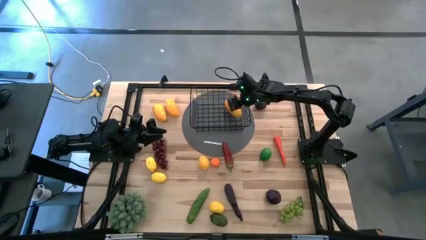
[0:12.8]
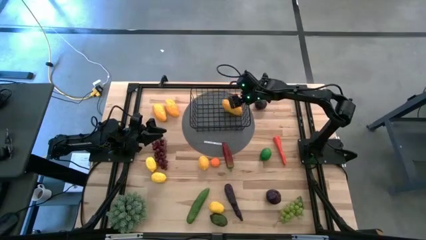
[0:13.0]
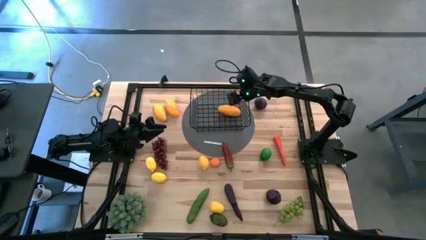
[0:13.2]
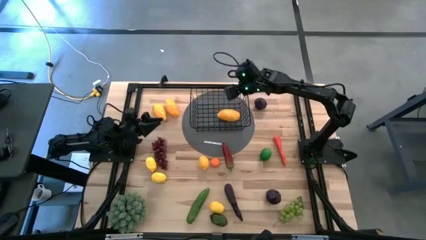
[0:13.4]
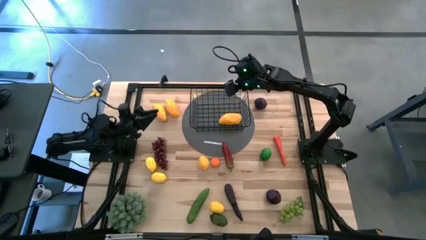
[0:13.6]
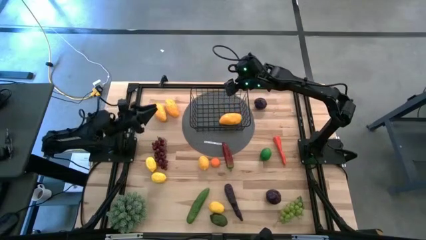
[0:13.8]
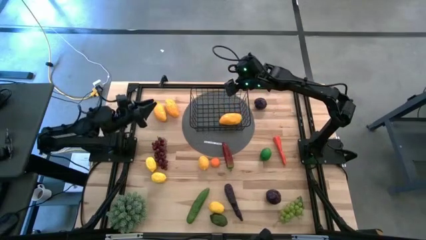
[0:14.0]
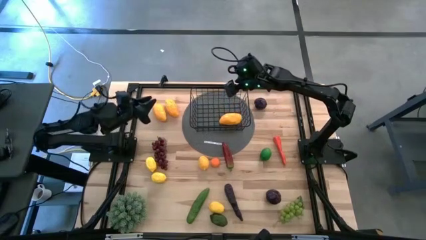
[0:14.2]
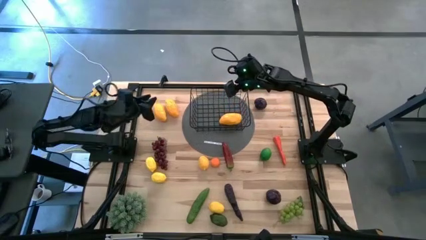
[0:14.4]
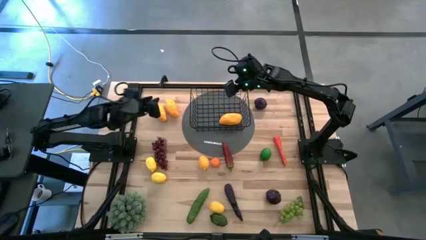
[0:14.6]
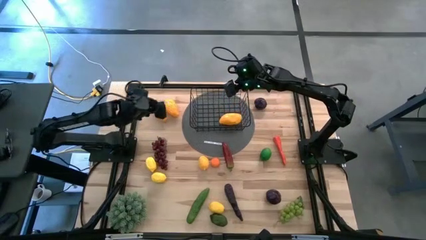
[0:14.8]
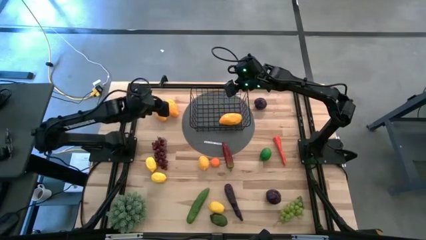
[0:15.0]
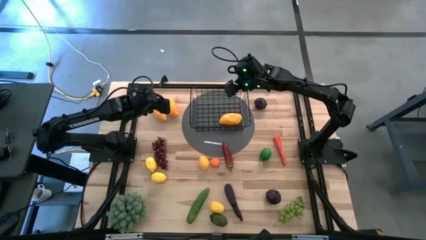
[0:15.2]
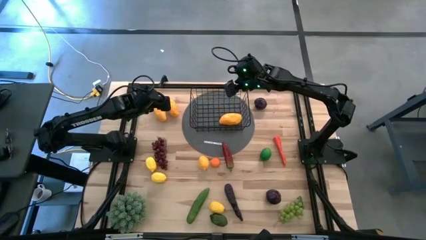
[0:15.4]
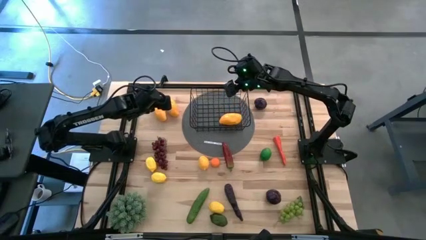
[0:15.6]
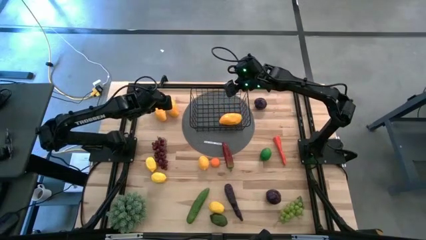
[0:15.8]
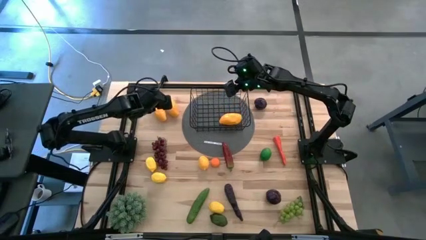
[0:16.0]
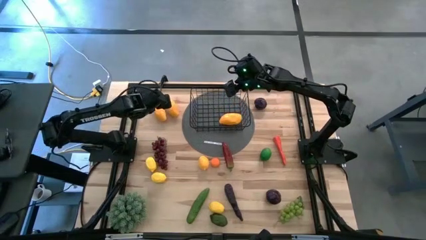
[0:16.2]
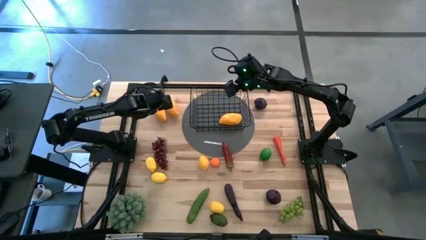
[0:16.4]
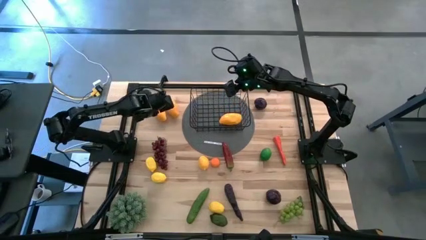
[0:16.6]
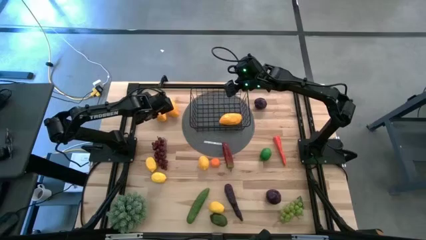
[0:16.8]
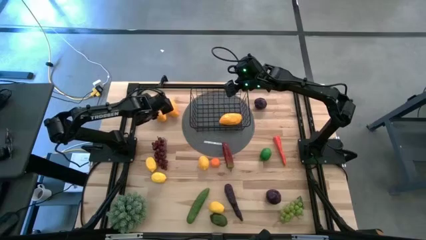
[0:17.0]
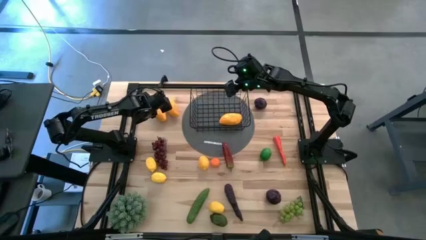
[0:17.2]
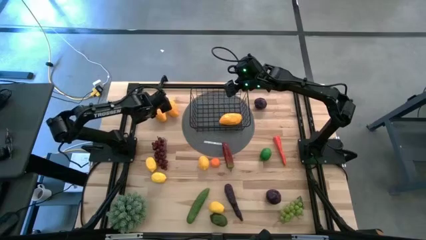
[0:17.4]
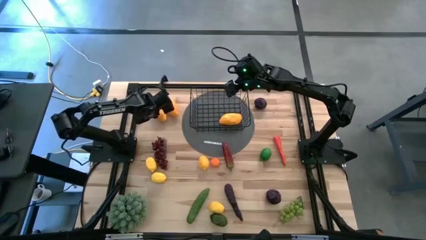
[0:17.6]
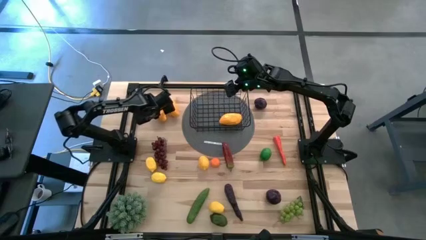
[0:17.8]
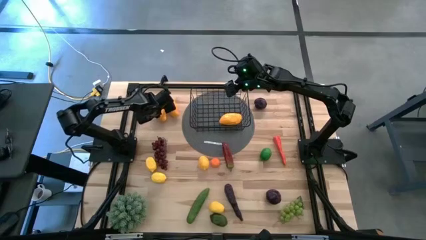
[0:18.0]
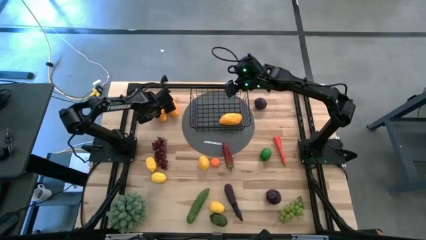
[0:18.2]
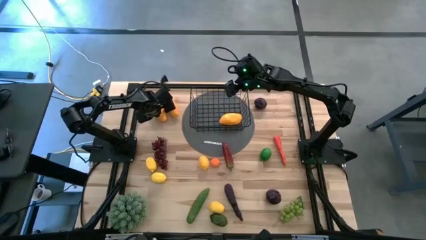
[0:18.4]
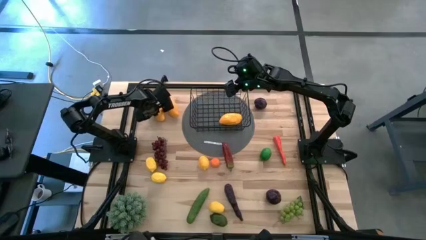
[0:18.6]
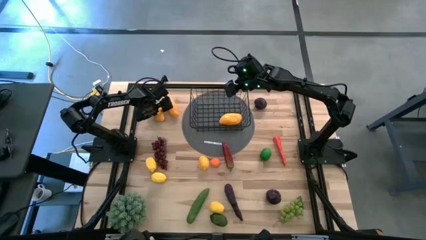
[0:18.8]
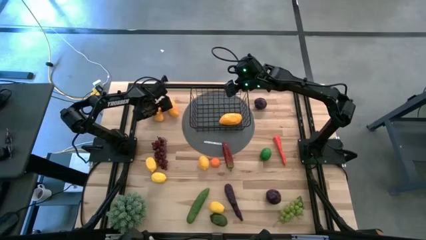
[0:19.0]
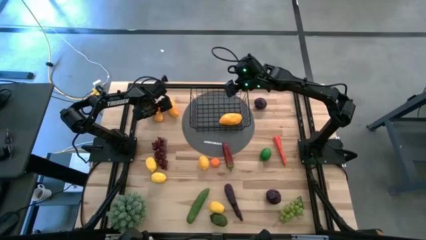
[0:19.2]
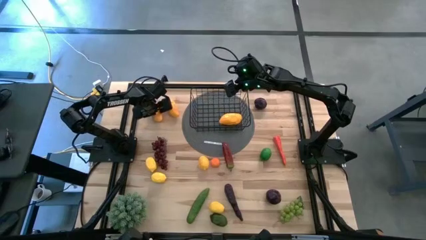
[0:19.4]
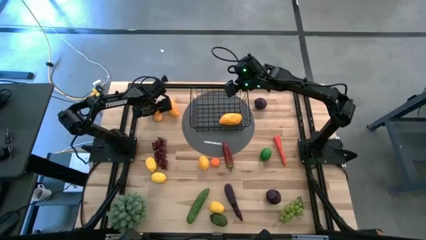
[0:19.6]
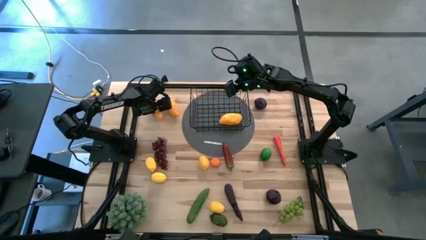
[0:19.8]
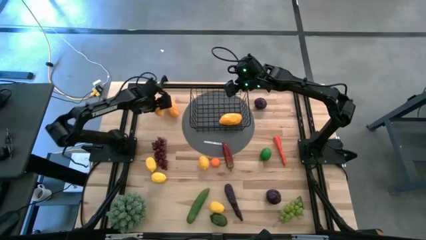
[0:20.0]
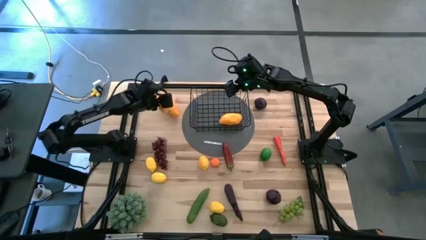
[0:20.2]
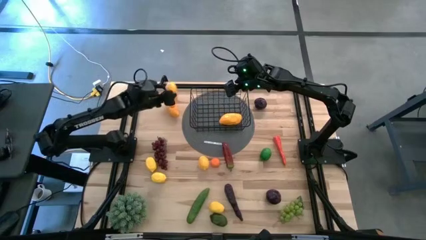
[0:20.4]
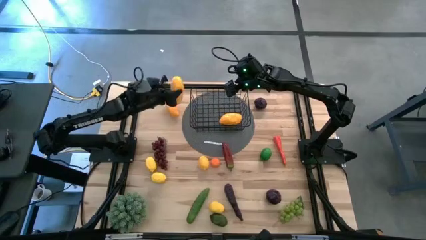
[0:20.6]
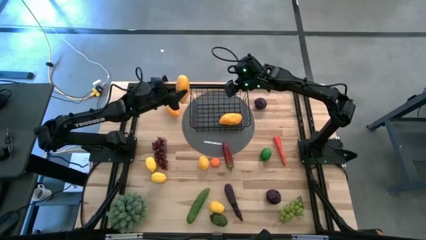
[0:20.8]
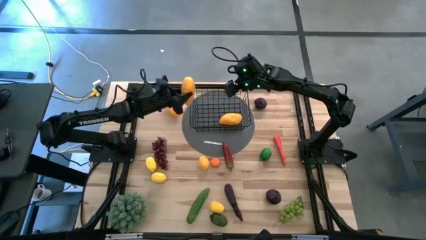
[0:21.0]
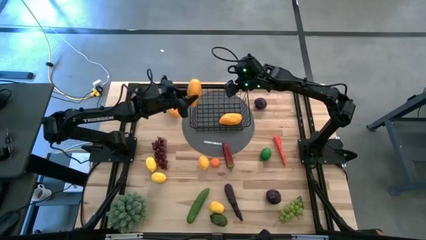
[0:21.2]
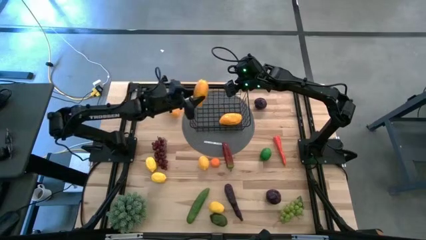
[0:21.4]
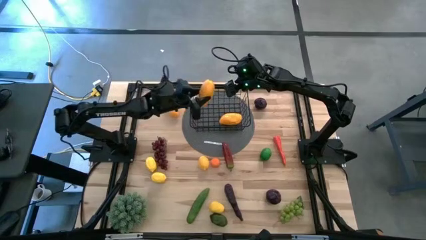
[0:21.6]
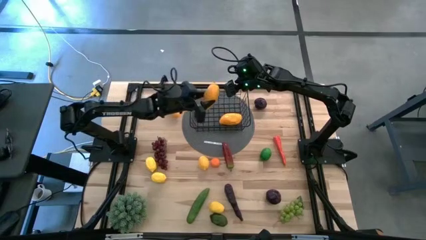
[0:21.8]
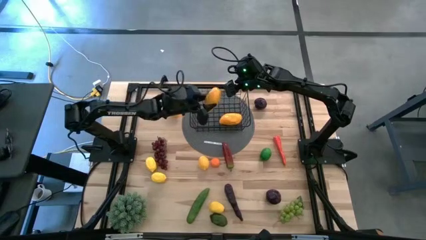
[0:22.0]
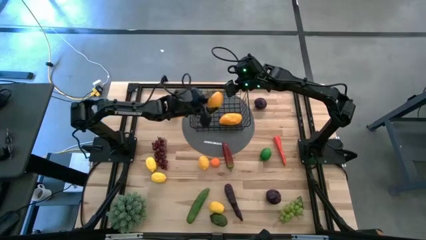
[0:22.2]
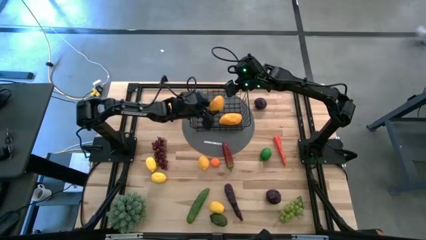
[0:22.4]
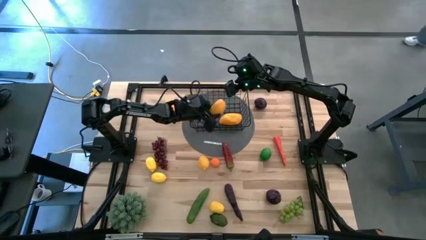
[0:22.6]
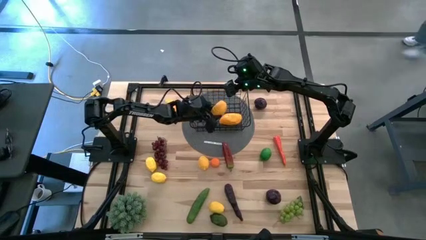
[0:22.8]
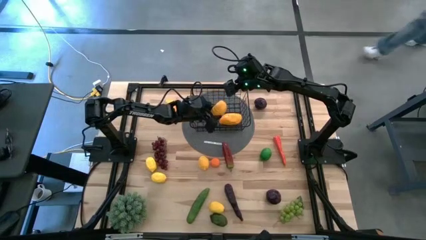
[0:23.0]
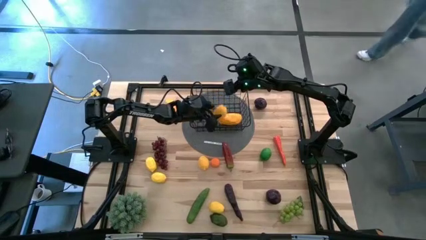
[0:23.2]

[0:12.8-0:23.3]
Task: Build produce basket
Put the left yellow mango into the black wire basket
